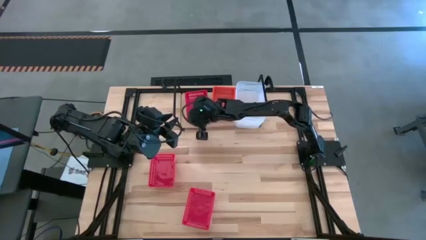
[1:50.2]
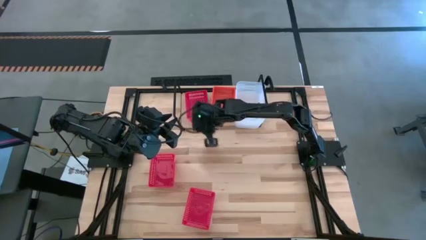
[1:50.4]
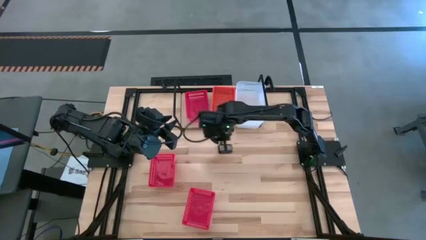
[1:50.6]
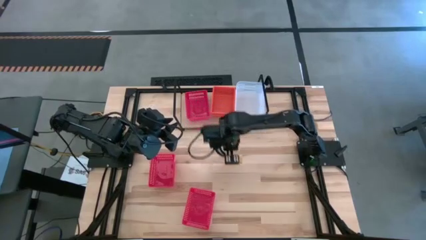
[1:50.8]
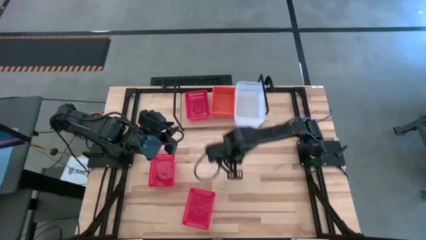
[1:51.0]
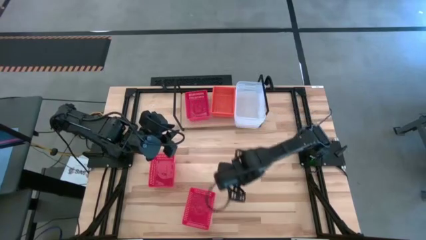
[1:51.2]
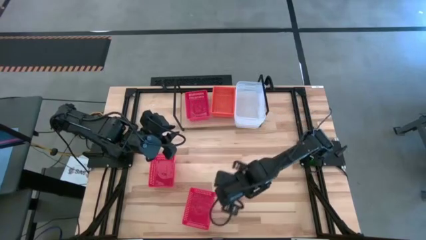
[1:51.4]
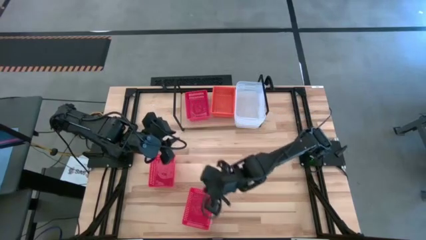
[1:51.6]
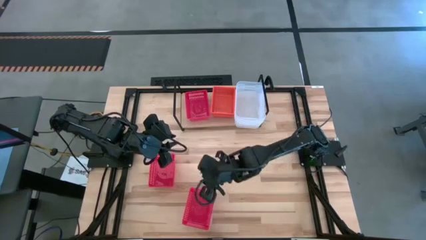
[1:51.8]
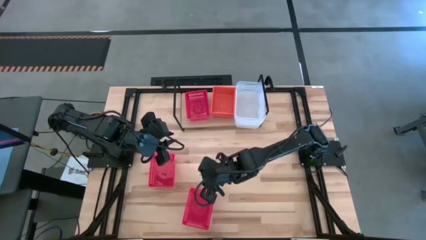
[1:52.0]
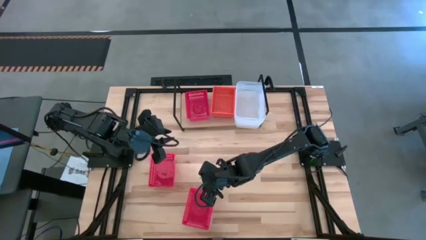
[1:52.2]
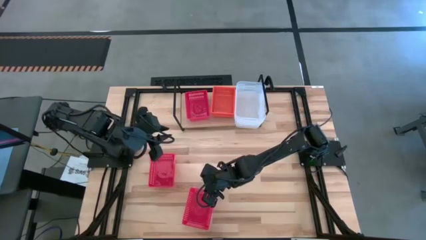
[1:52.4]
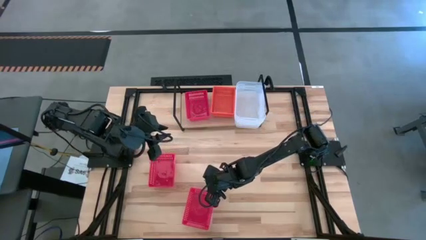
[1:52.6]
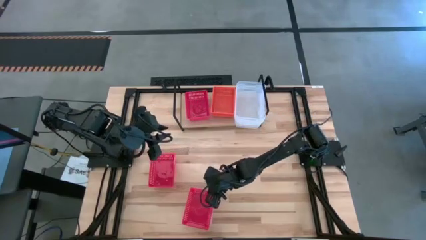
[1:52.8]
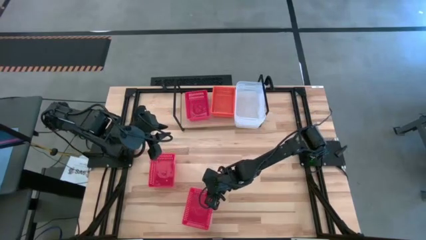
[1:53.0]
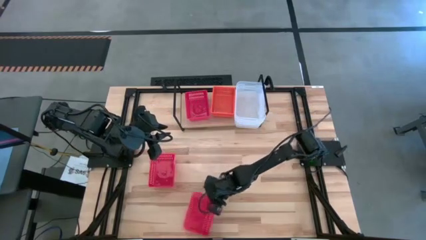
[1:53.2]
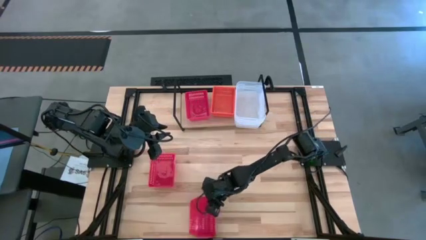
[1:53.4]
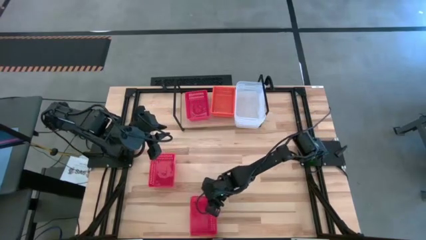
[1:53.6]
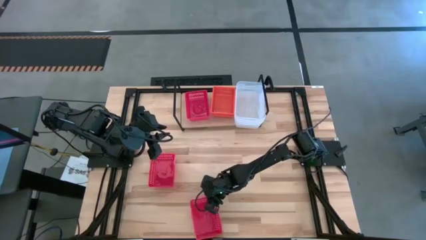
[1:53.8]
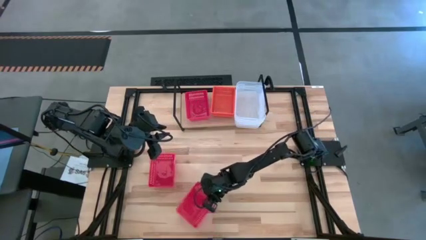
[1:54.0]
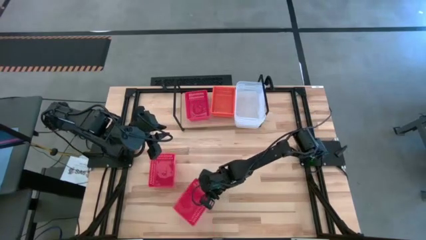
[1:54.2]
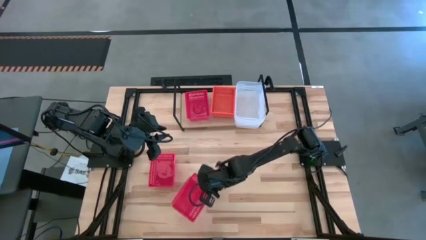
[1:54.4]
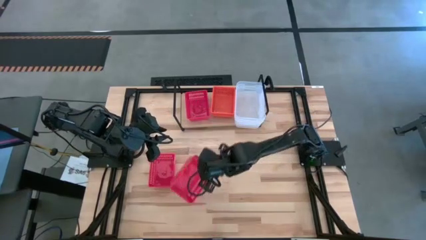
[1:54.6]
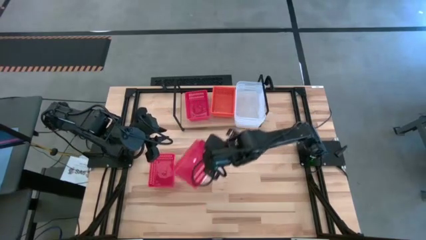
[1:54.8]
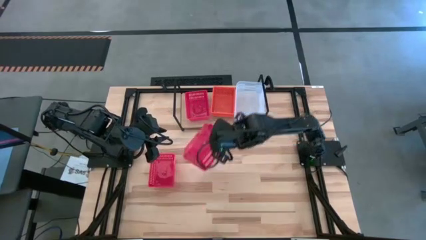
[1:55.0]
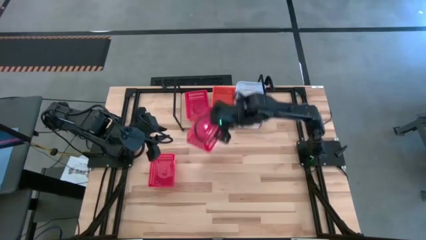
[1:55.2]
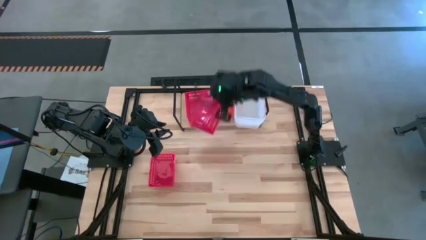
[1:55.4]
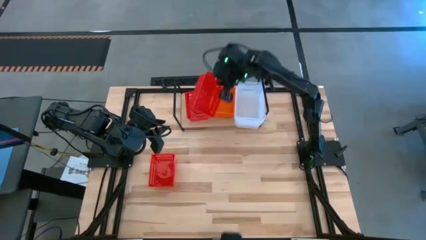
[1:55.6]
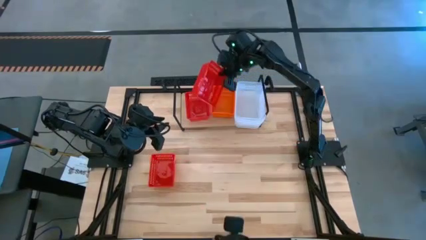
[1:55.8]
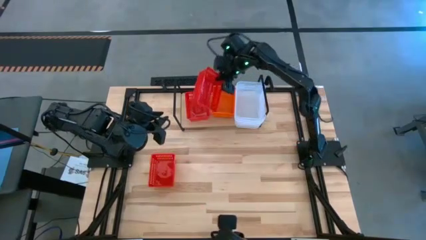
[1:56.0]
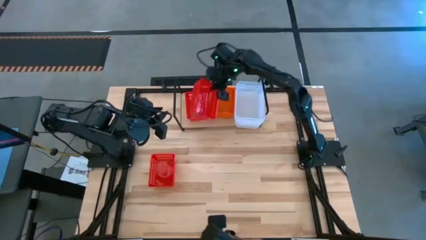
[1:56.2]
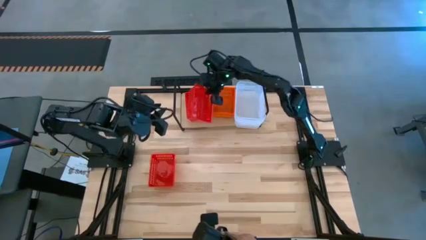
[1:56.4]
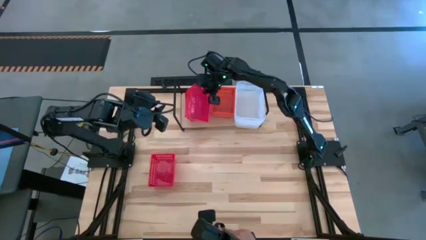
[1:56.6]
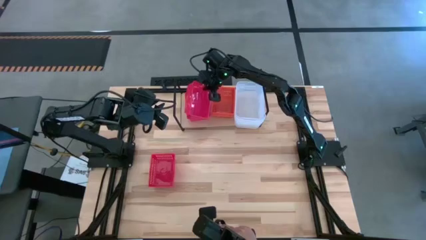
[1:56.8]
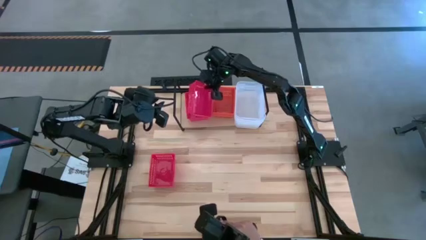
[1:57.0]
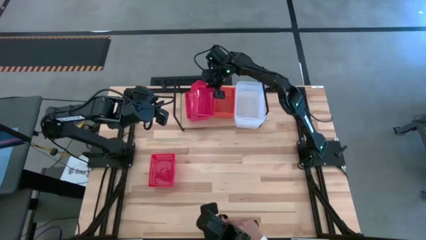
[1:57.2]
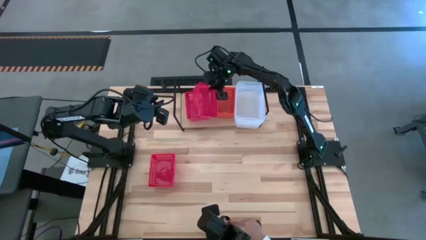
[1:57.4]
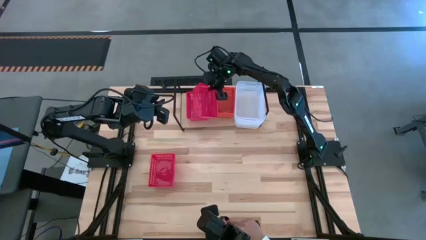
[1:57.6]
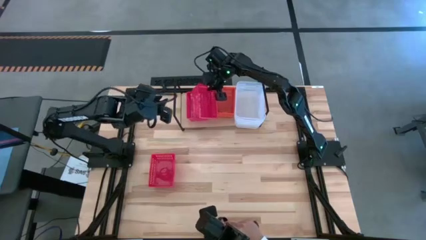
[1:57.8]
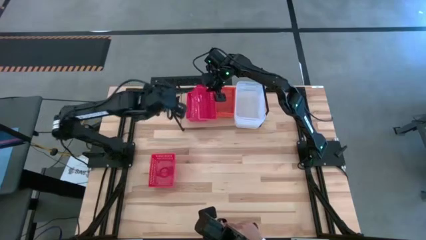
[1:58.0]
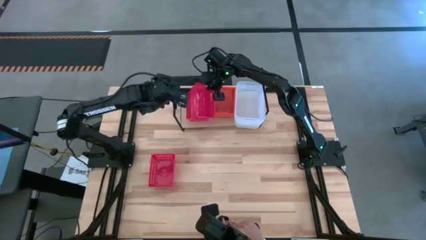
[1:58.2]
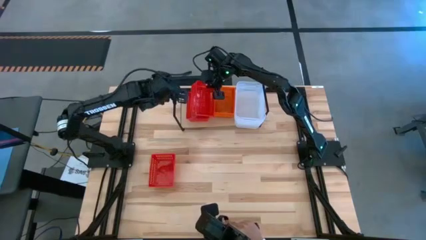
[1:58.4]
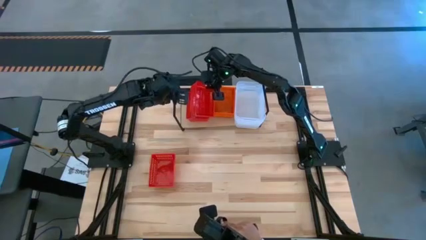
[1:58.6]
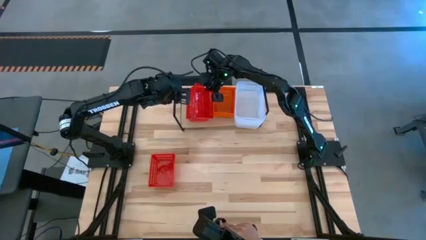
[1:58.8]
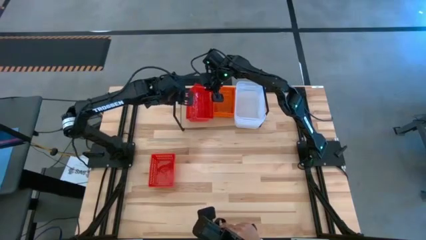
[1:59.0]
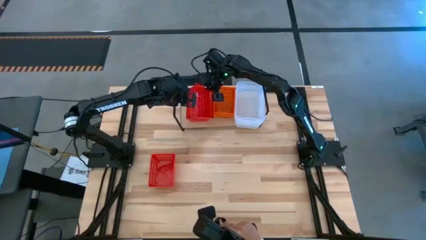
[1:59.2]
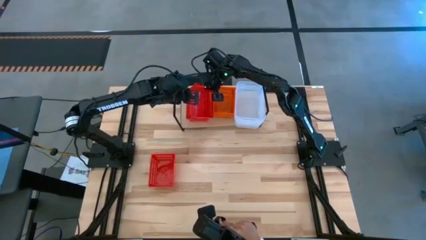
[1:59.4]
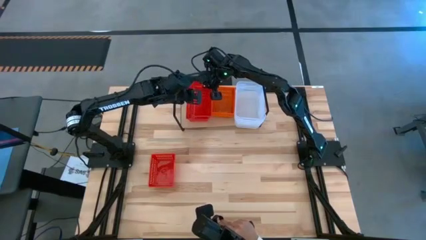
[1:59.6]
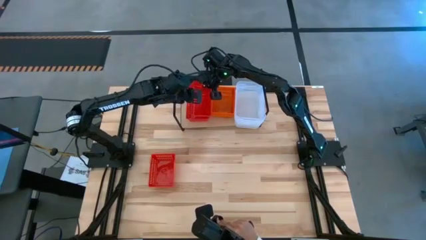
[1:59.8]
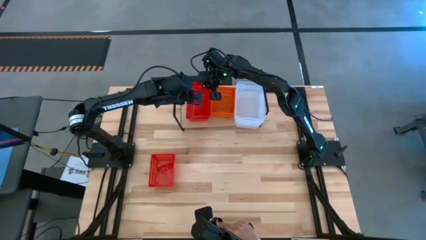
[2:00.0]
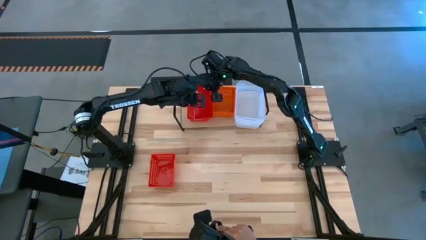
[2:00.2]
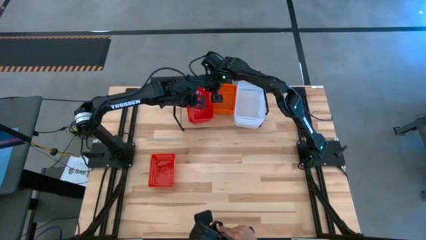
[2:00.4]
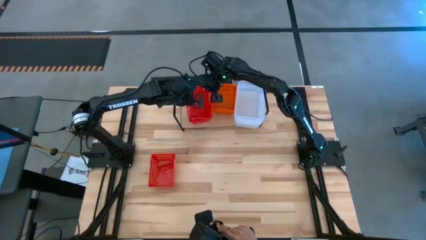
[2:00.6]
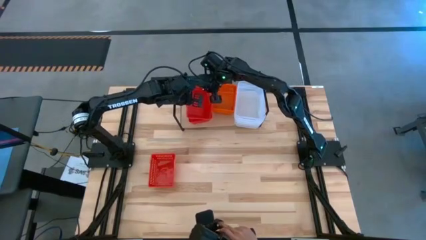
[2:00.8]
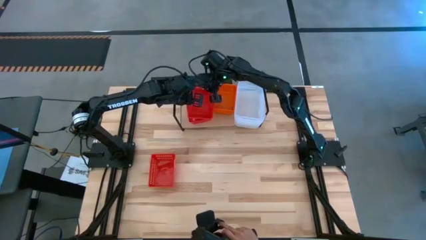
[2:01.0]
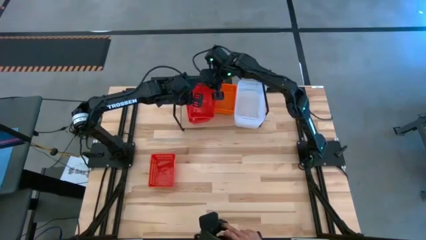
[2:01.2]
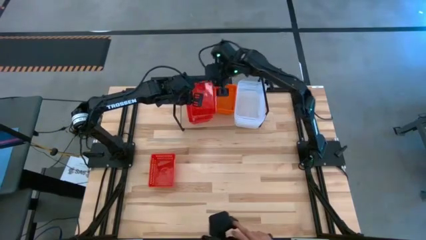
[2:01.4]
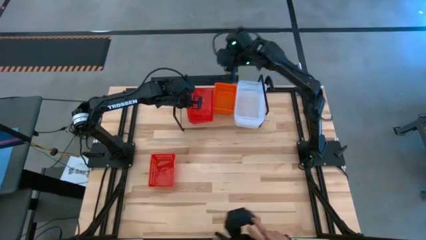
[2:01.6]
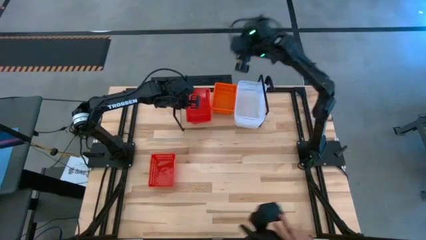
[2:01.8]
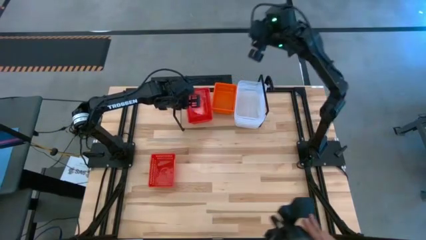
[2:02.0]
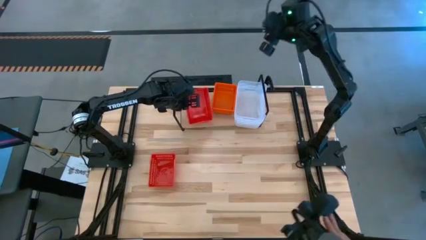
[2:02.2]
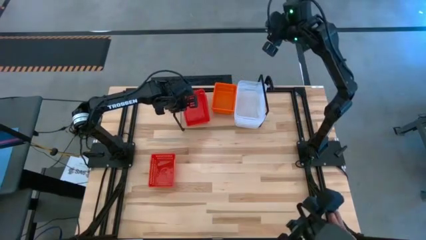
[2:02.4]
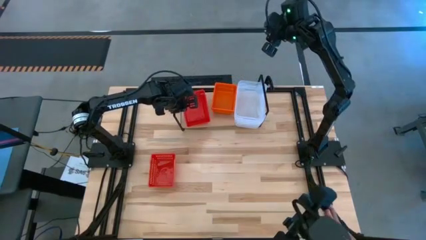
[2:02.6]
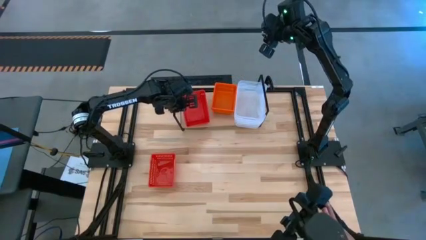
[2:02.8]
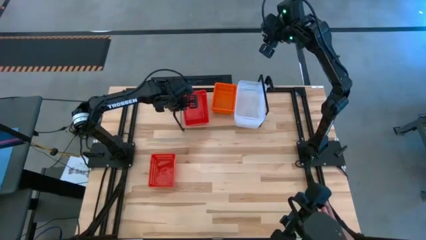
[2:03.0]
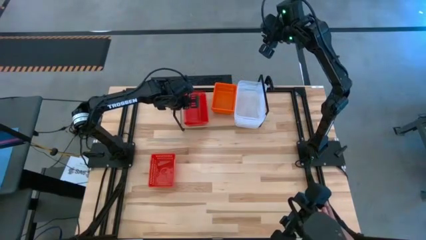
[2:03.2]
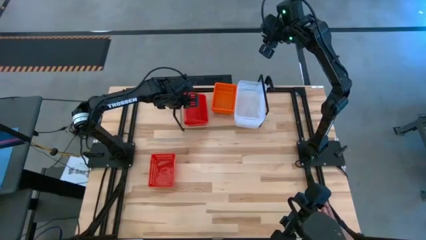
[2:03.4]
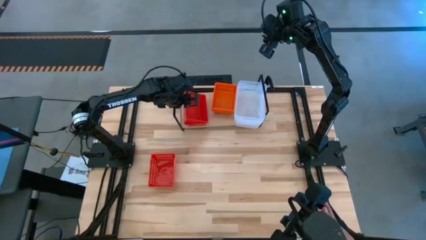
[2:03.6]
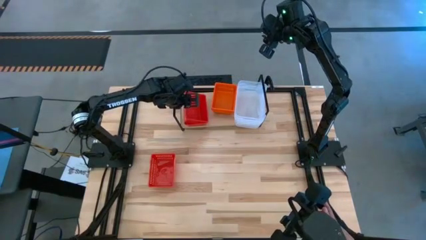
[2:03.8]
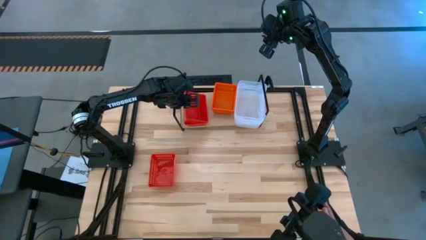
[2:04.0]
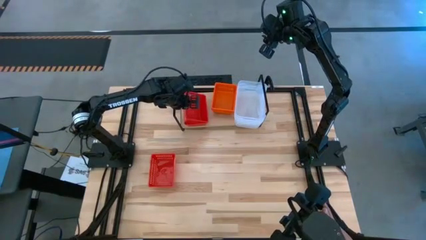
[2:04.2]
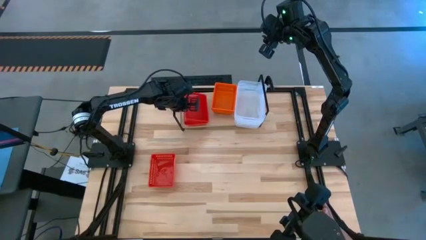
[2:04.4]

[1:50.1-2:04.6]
Task: Stack baskets on shelf by color
Stack the bottom red bin on top of the red bin on the shelf

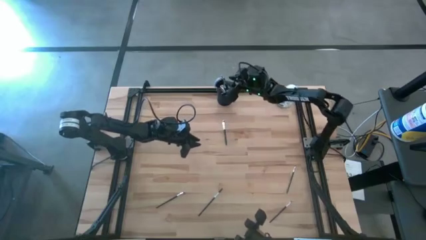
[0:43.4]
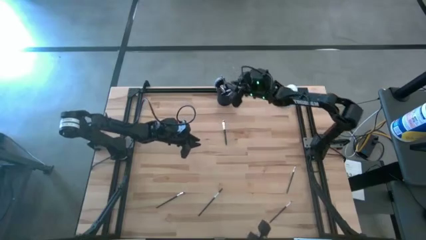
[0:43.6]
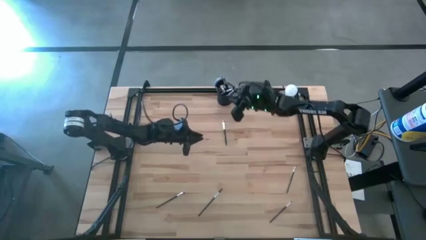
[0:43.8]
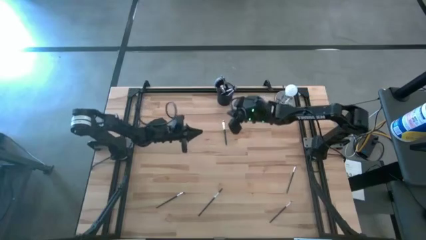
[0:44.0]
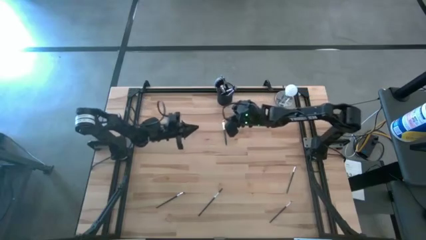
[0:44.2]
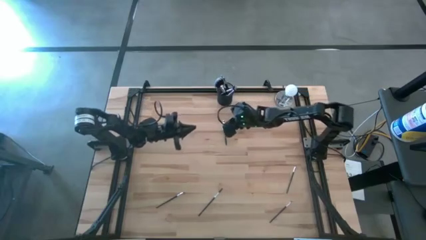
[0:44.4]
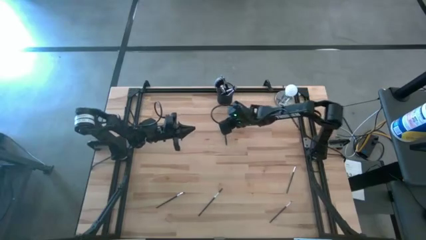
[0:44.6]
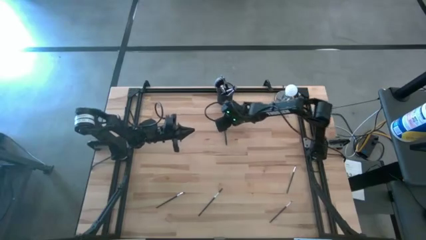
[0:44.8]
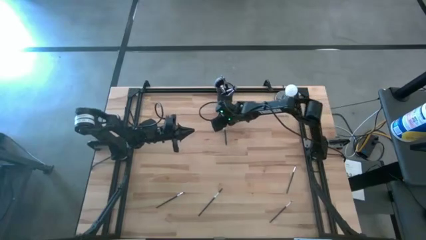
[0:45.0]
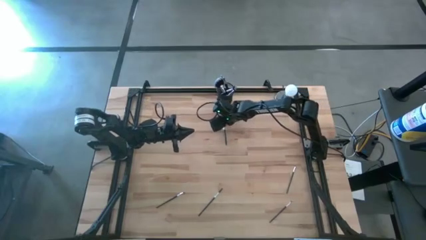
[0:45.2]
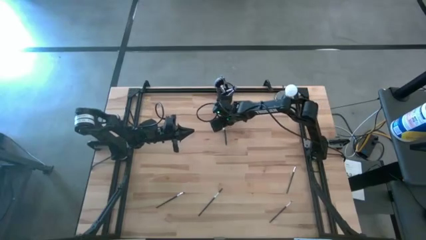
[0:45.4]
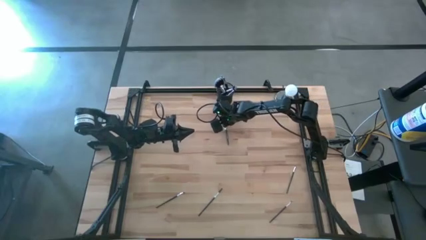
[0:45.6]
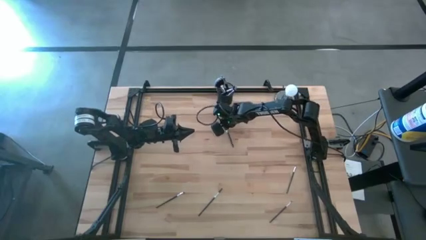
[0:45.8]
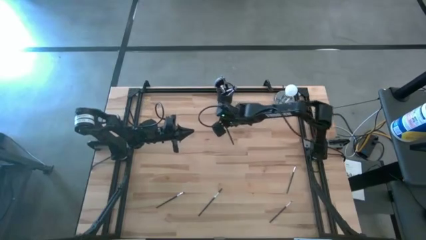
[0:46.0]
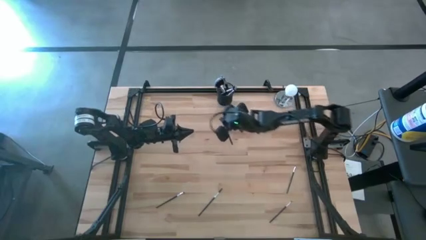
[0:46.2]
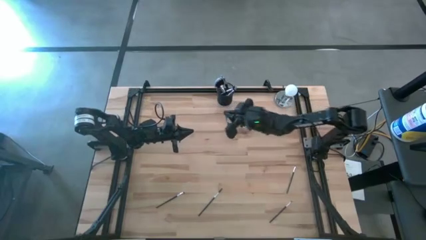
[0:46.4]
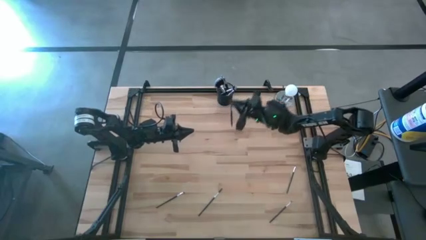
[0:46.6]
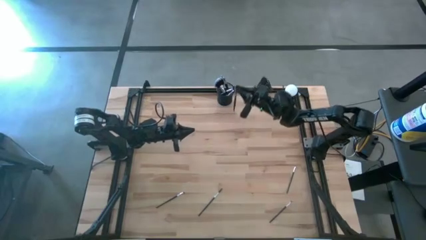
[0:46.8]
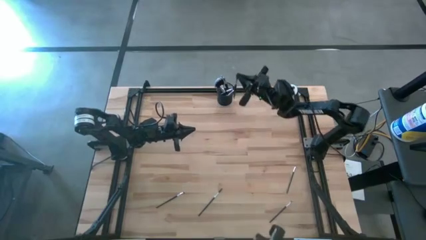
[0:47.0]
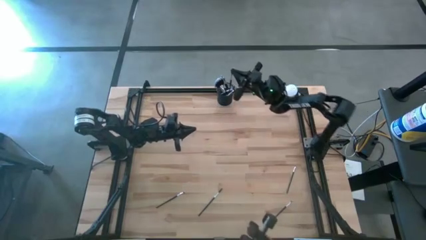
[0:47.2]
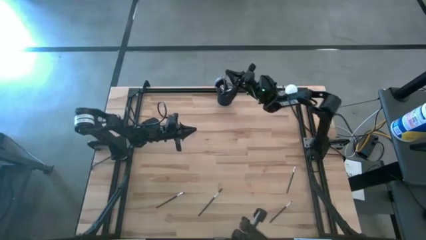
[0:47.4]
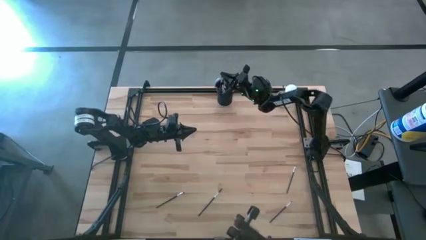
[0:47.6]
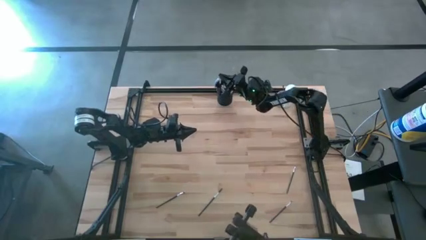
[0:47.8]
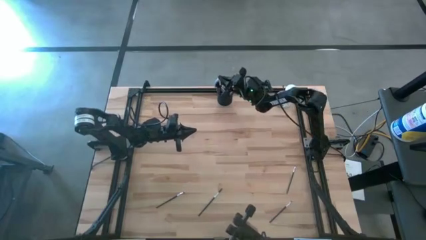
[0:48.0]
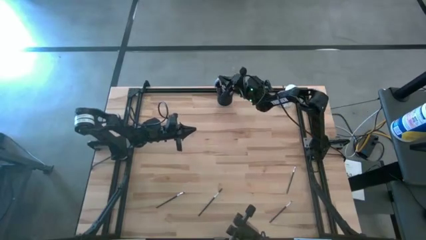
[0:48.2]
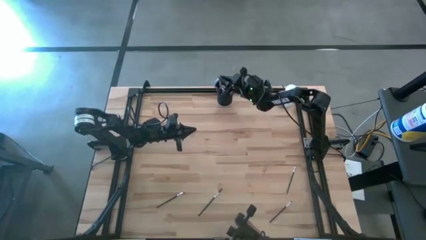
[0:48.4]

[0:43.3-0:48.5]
Task: Put items in baskets/containers
Put the black eyeshadow brush into the black pen holder
